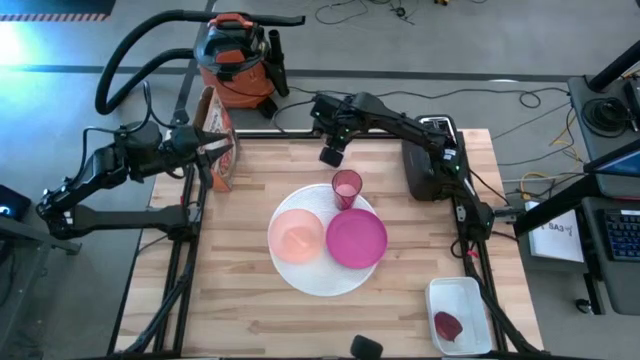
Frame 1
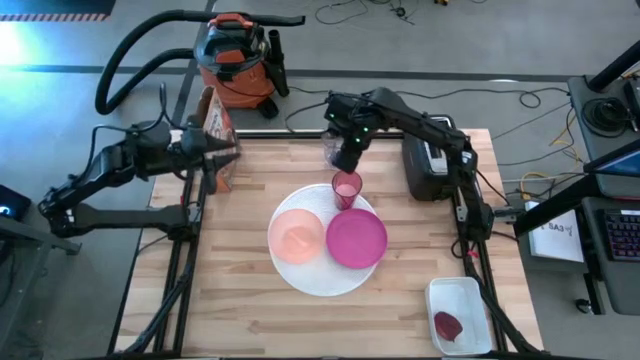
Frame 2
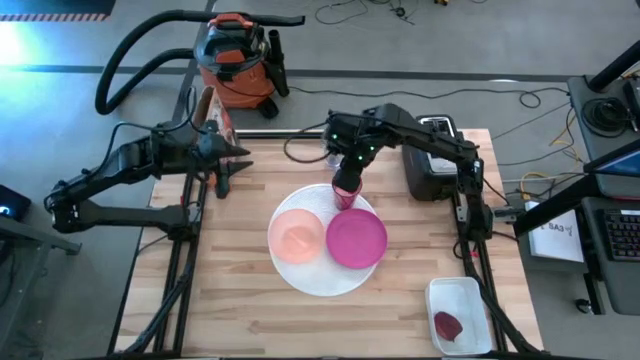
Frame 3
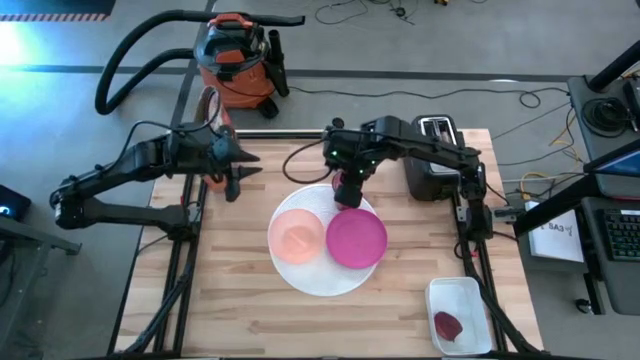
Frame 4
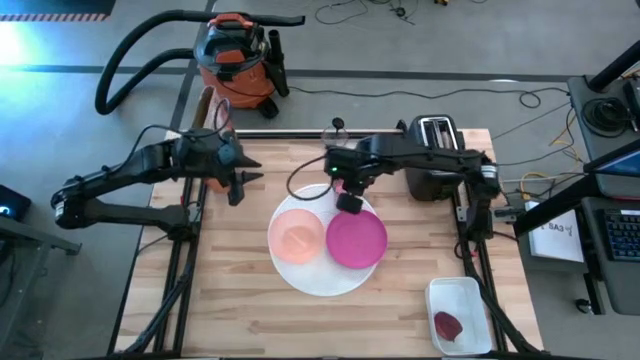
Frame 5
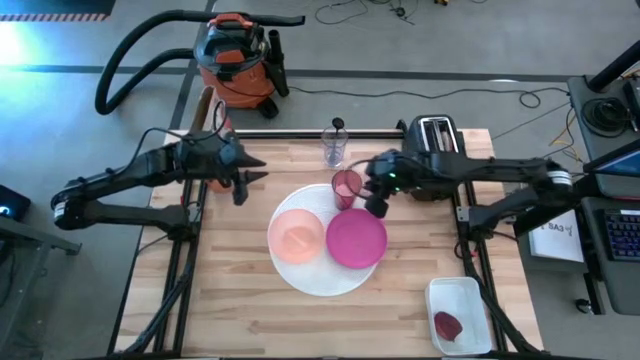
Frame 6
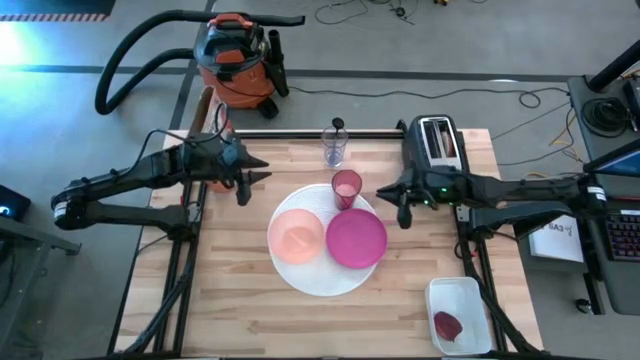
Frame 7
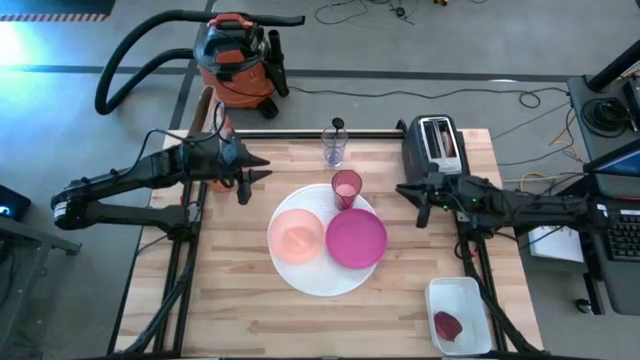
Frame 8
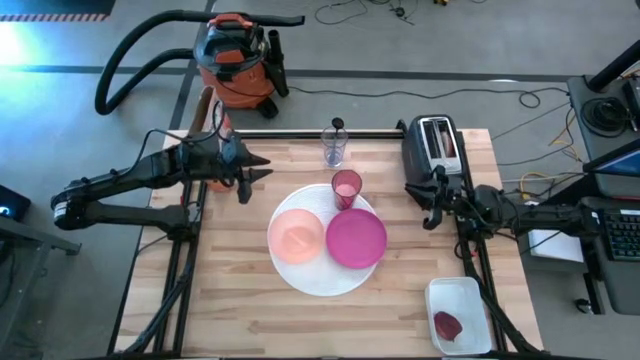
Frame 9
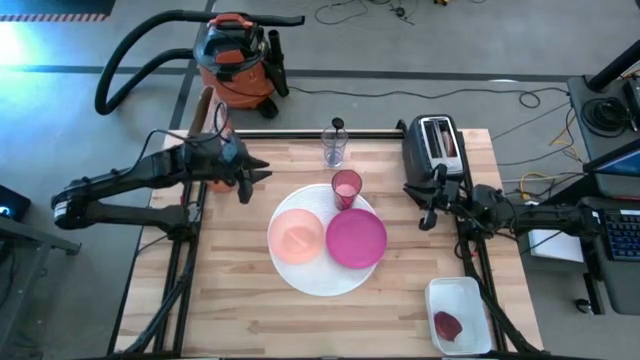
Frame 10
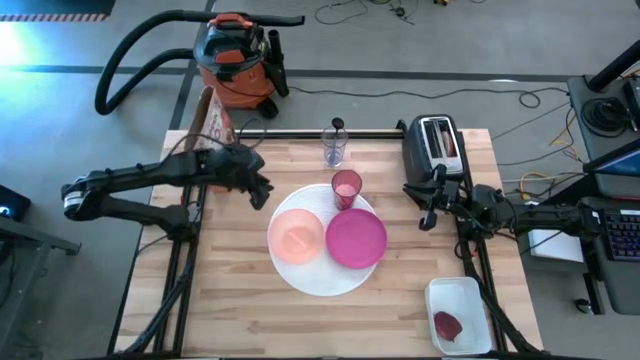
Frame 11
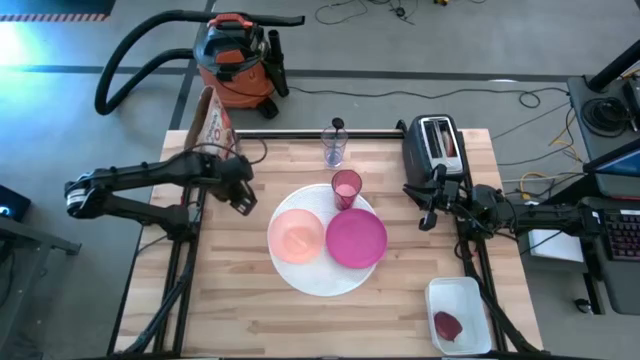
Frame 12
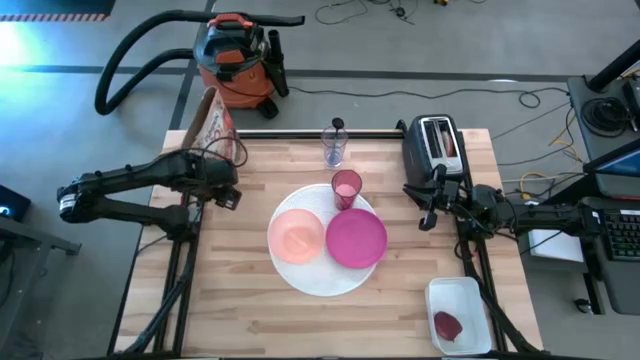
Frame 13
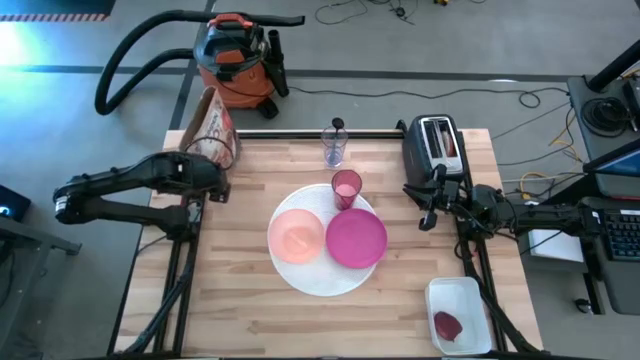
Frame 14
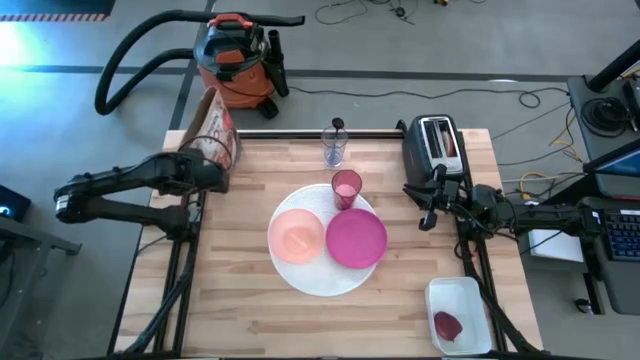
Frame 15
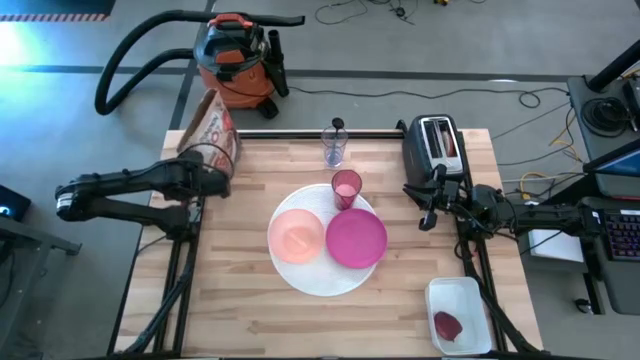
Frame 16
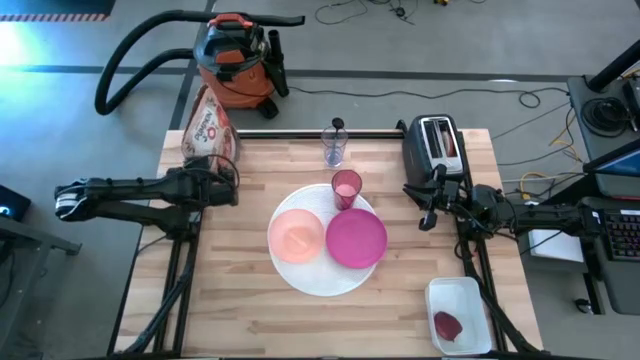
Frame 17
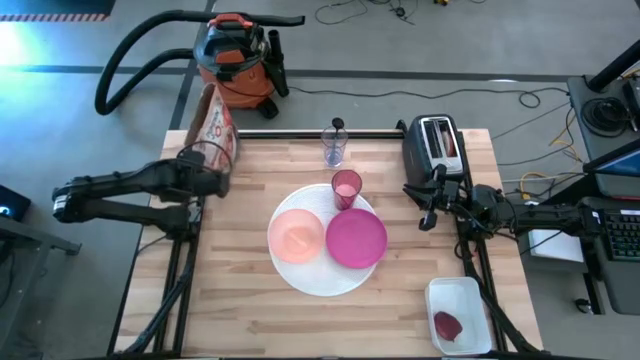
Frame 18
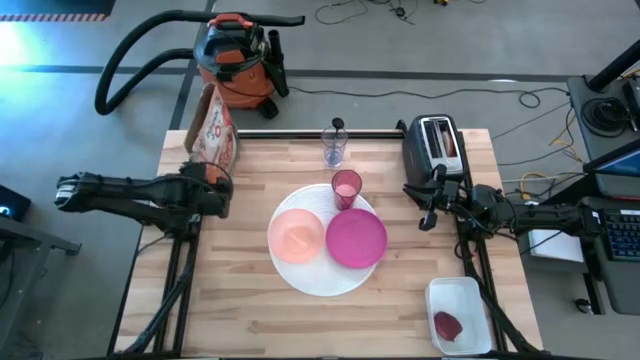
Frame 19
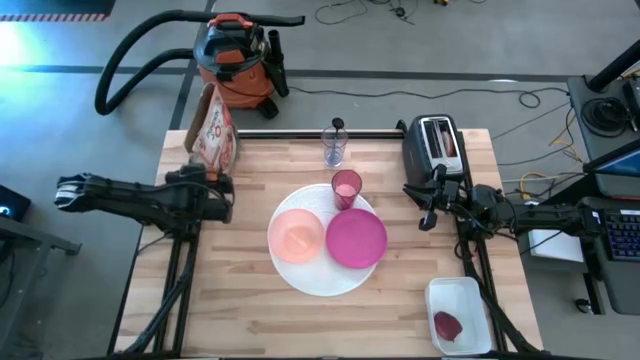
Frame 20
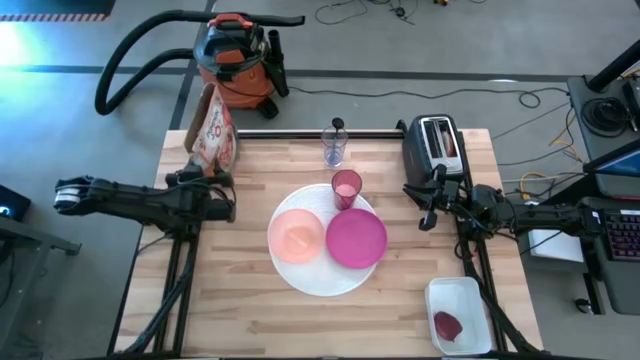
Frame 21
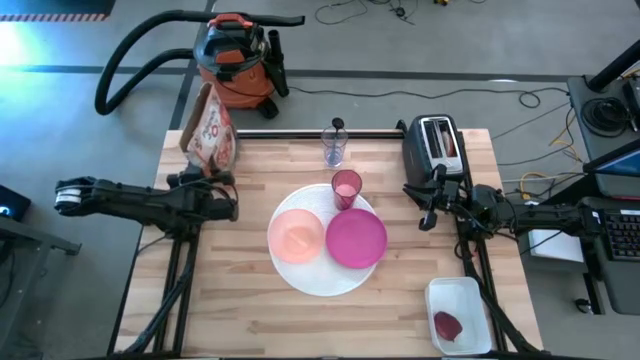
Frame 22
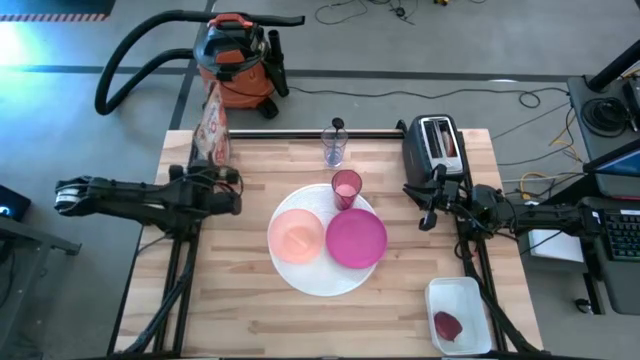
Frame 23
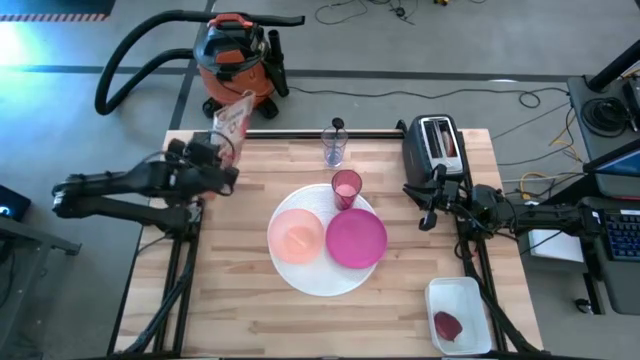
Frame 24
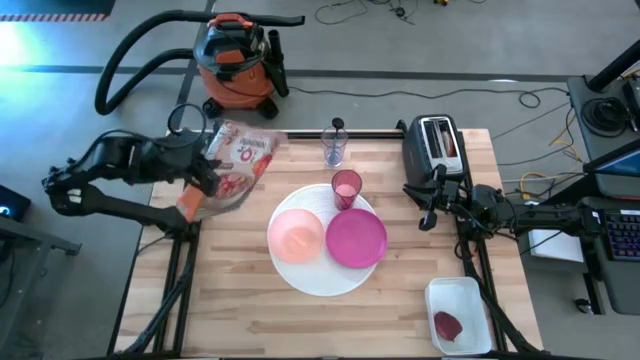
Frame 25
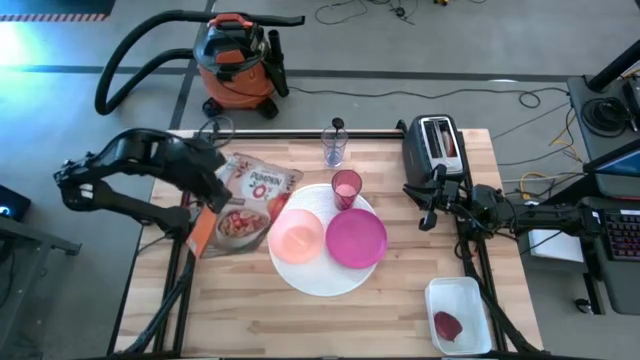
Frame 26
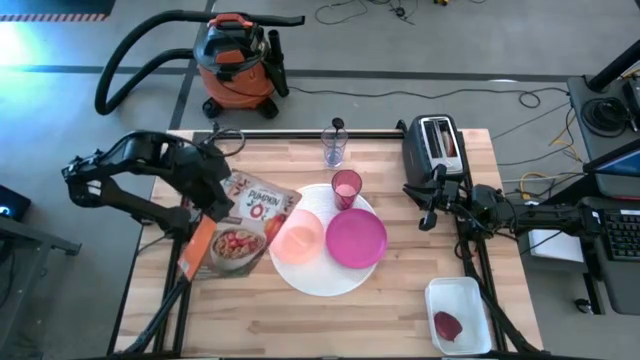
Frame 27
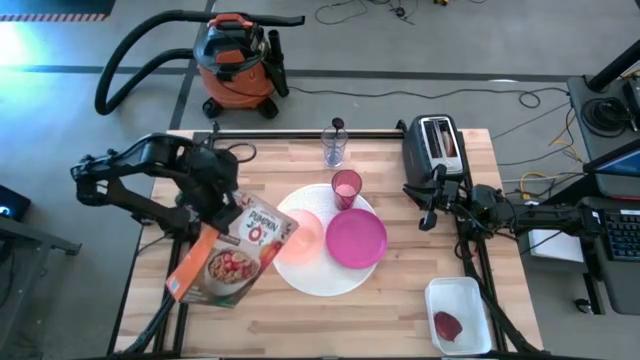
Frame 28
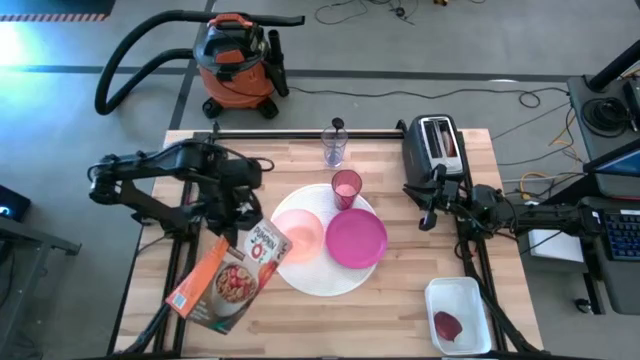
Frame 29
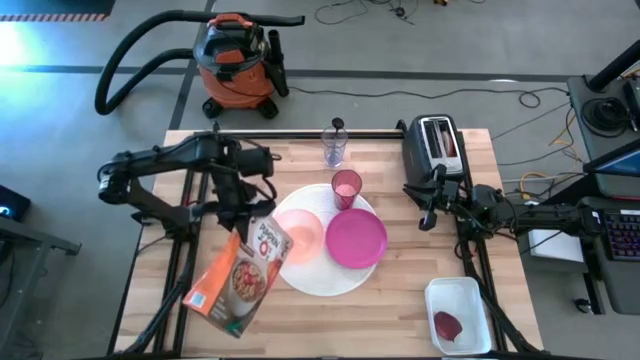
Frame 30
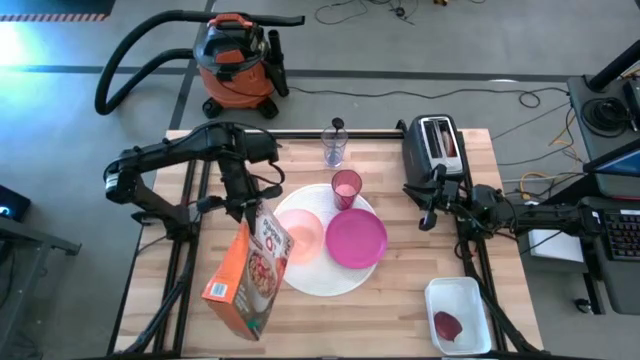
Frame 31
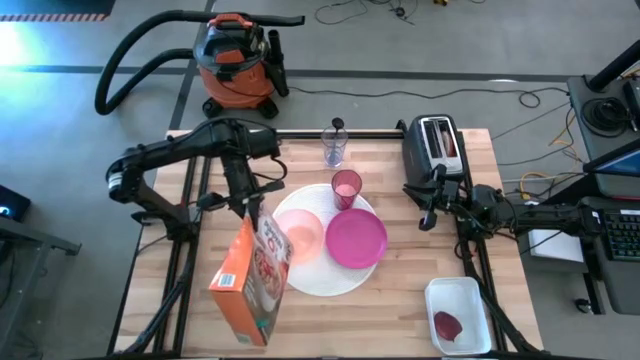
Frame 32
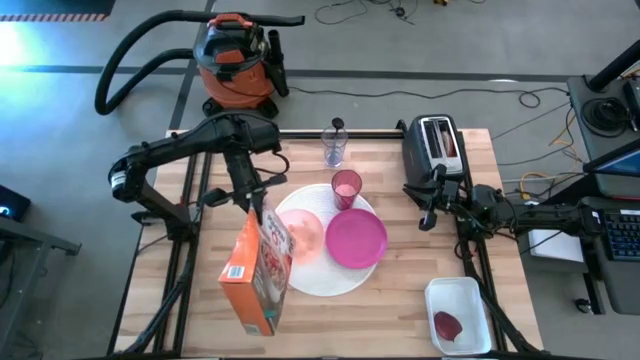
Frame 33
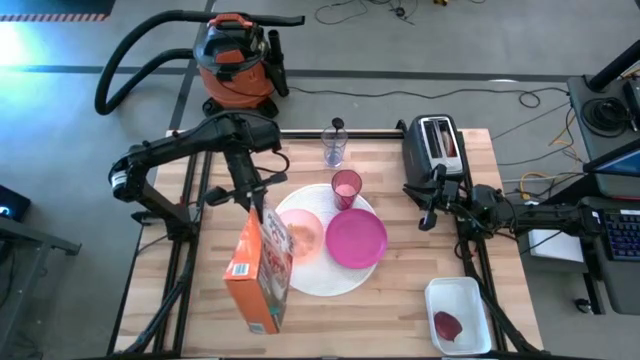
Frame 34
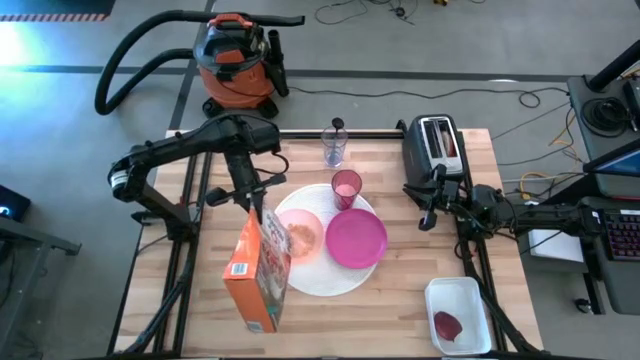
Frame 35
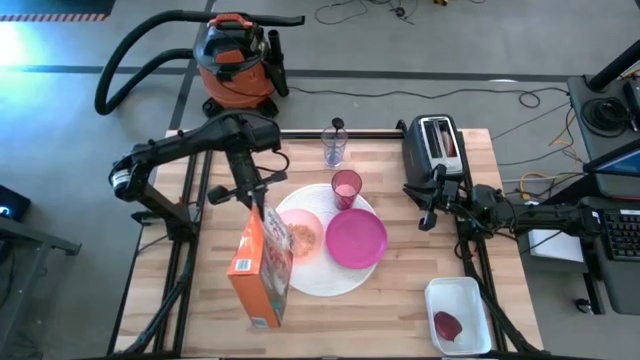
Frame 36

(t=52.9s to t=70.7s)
Task: Arrange a breakfast setting
Pour the cereal from the cereal box into the orange bowl
